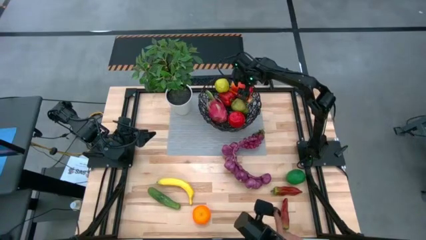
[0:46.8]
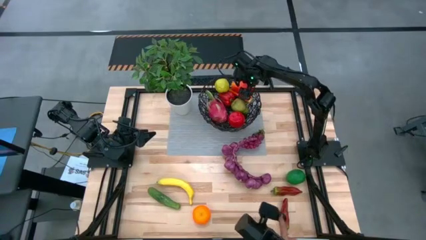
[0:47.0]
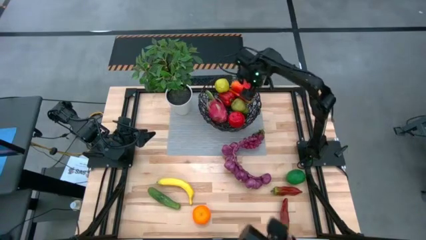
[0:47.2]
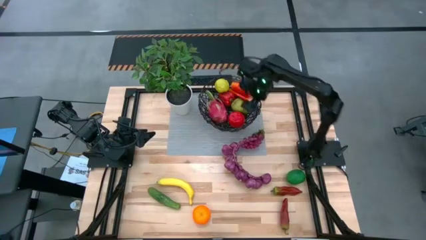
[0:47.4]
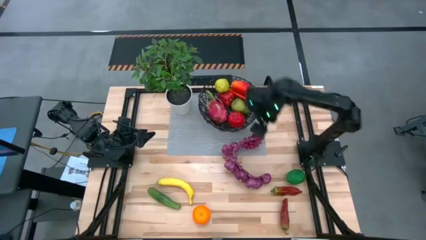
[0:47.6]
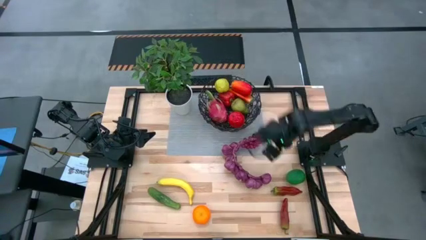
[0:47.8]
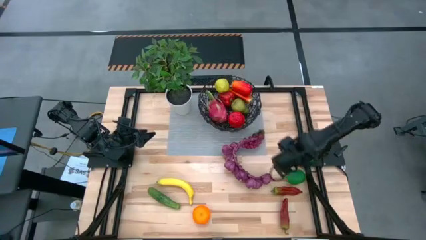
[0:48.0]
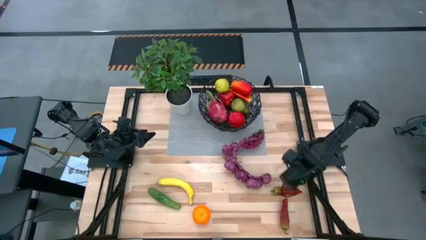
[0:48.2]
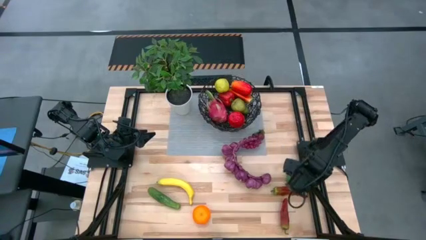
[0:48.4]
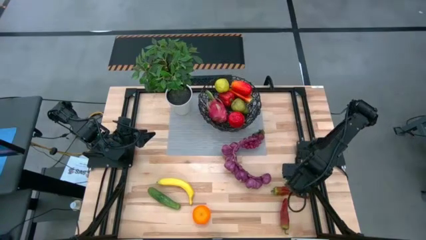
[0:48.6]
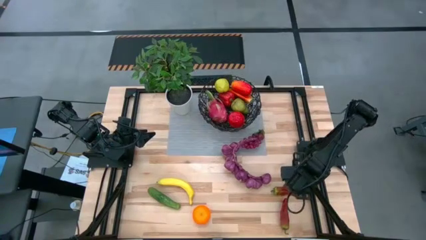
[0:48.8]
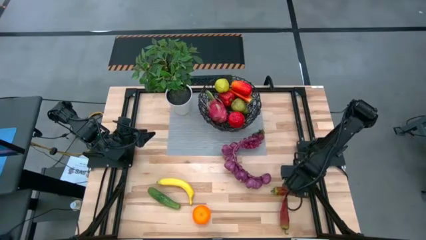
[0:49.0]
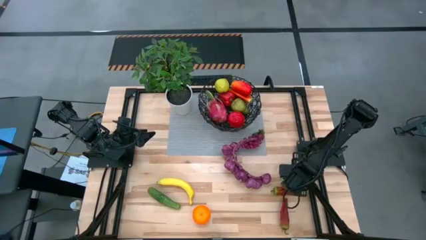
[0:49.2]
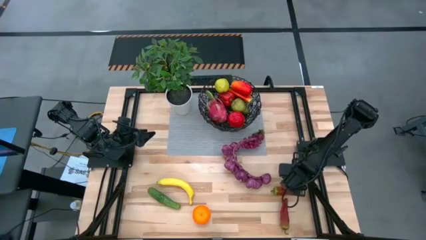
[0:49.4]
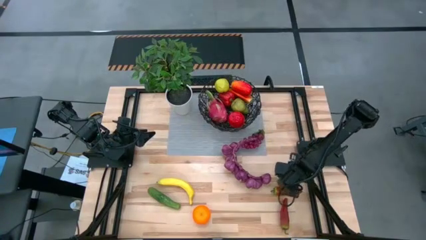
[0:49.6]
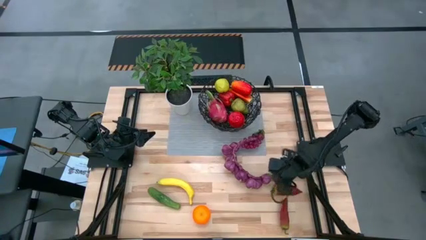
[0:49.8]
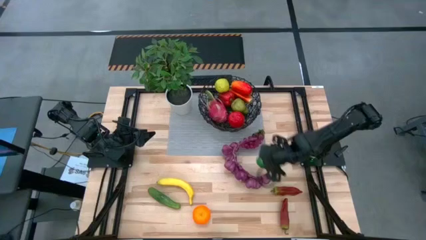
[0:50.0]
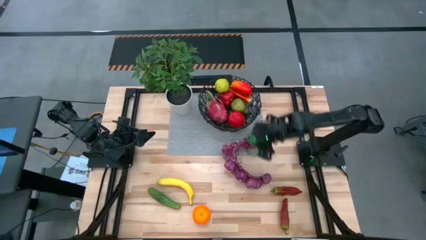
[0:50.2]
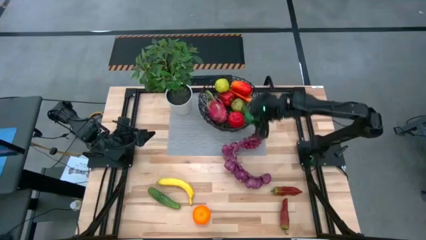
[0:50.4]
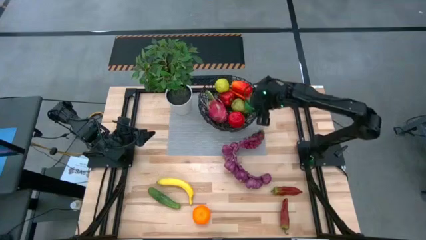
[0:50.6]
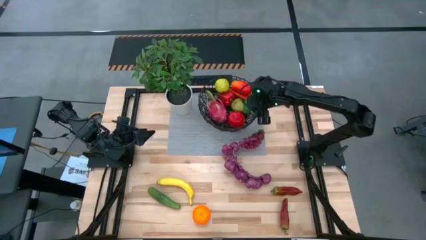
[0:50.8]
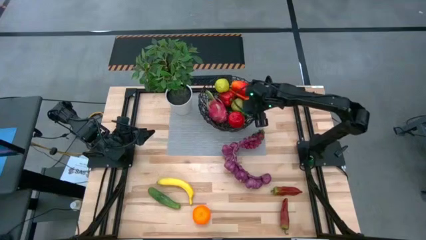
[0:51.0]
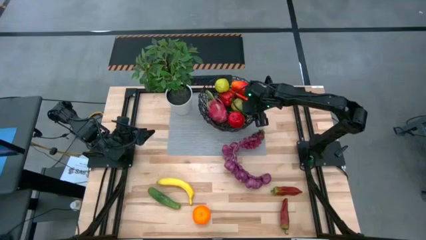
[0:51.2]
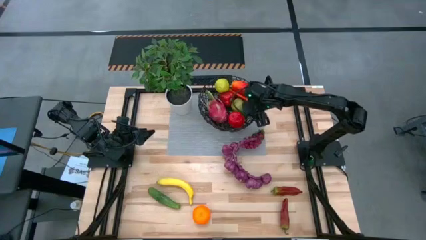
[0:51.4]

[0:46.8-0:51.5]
Task: Build produce basket
Put the green lime into the black wire basket

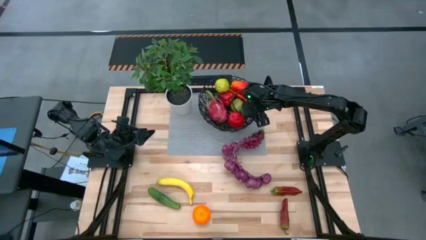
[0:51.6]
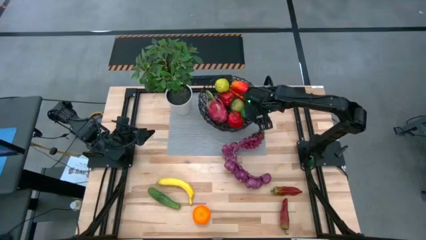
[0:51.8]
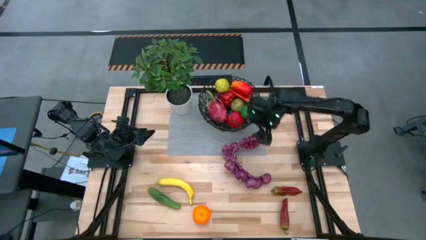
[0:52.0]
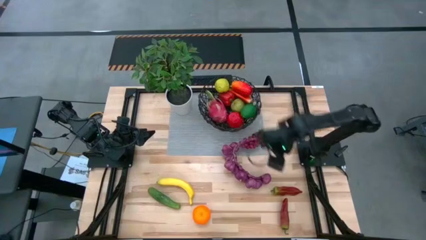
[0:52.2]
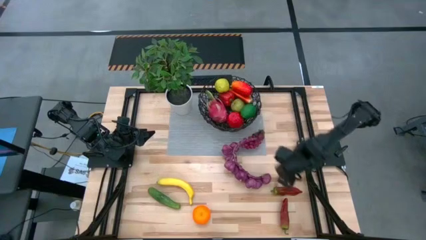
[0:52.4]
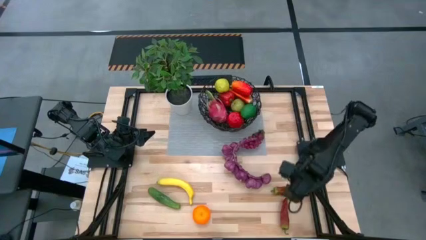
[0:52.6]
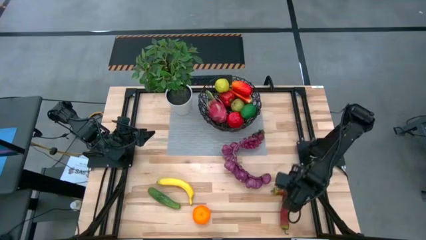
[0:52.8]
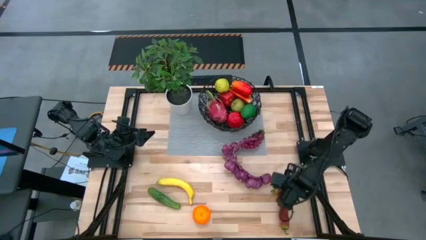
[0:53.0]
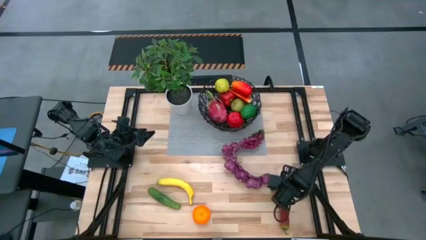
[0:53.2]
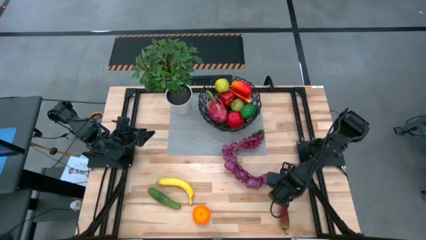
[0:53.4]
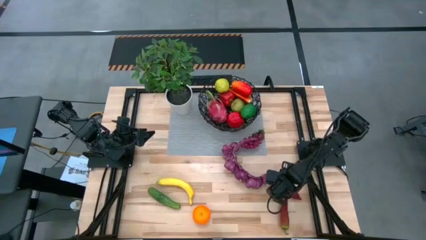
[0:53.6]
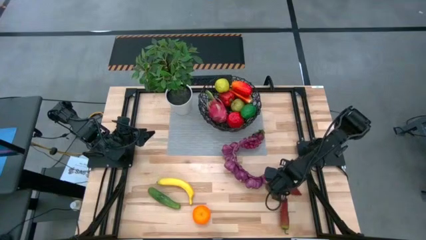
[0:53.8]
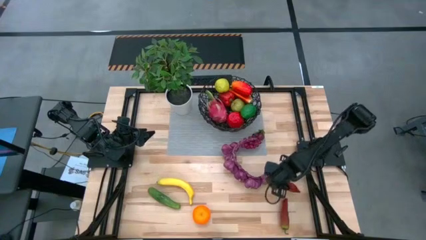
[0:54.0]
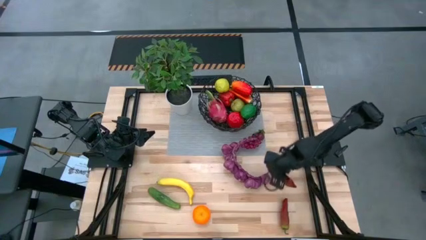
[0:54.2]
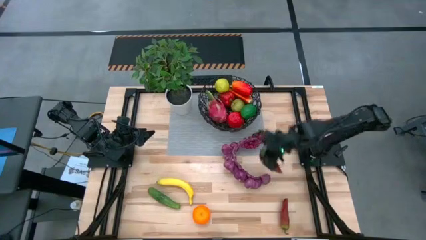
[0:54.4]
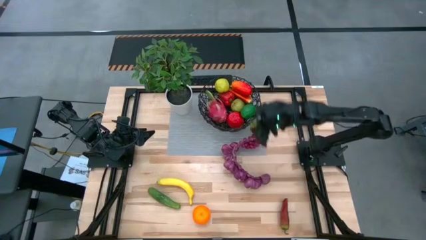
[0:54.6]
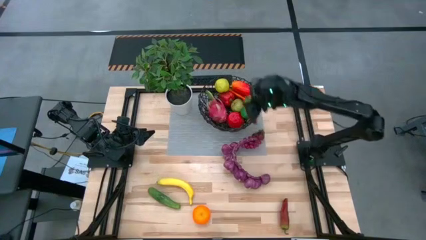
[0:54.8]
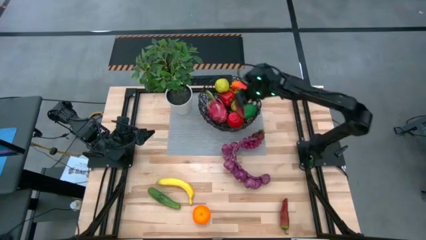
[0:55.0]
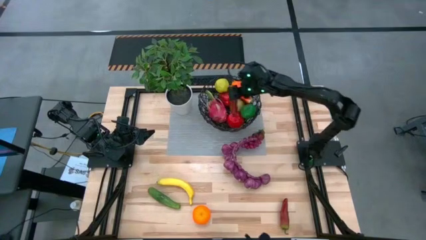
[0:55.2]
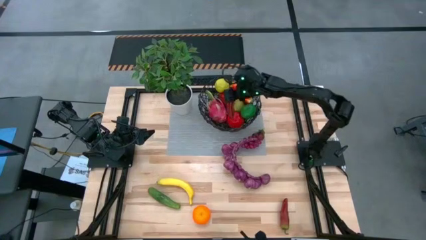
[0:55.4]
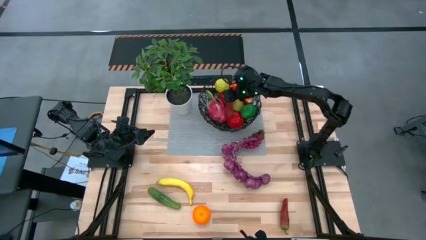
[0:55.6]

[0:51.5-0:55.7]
Put the top red chili pepper into the black wire basket

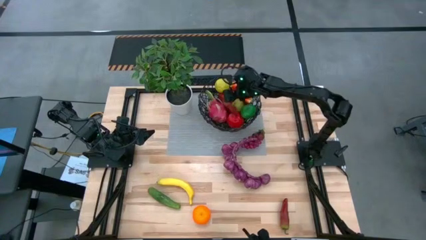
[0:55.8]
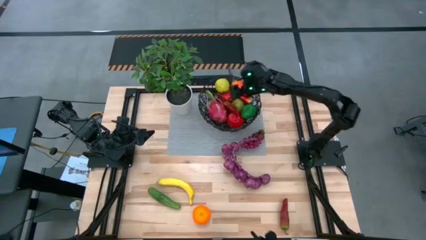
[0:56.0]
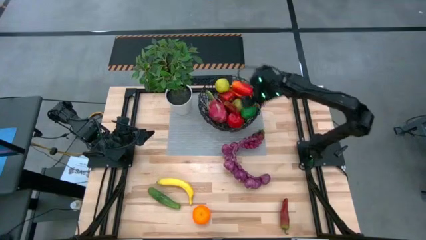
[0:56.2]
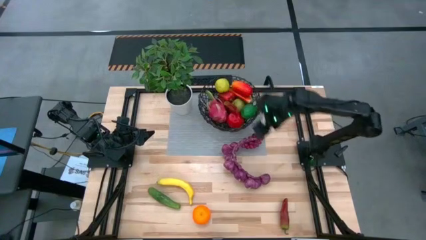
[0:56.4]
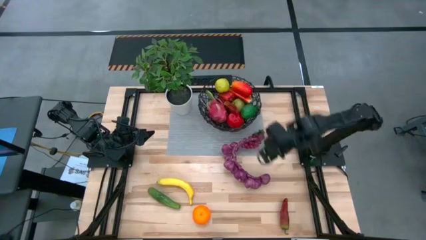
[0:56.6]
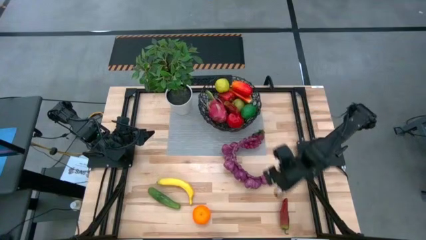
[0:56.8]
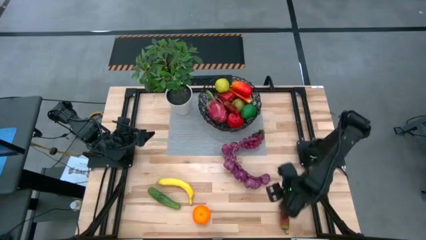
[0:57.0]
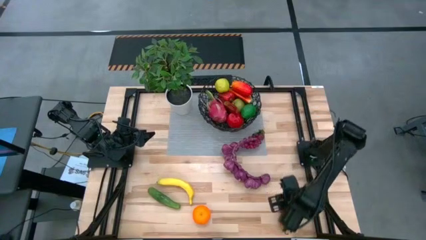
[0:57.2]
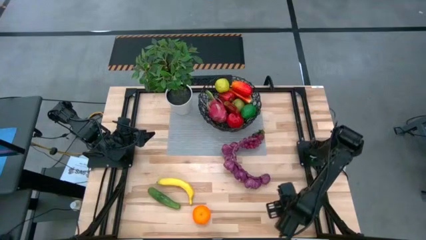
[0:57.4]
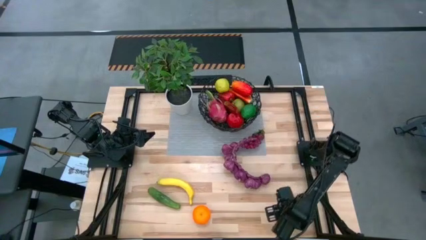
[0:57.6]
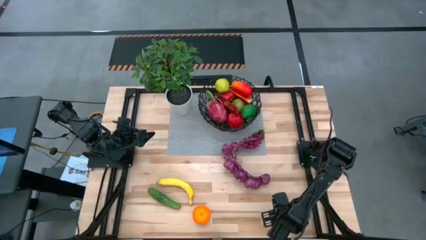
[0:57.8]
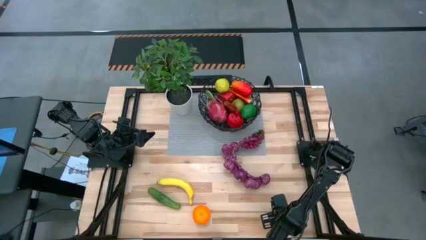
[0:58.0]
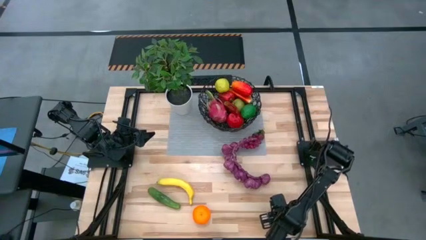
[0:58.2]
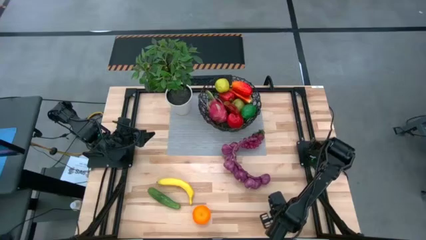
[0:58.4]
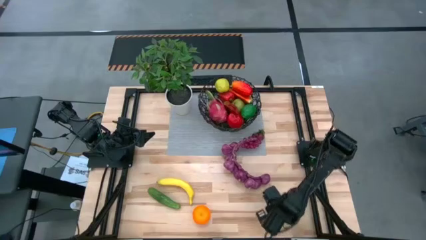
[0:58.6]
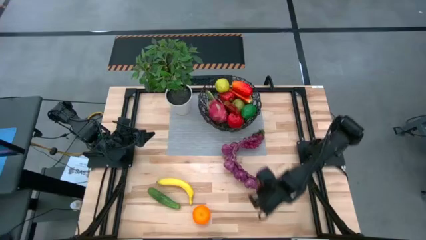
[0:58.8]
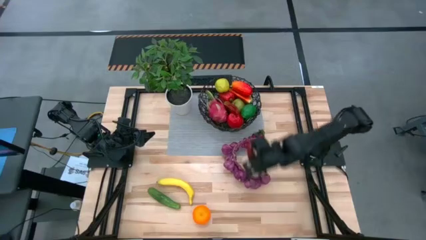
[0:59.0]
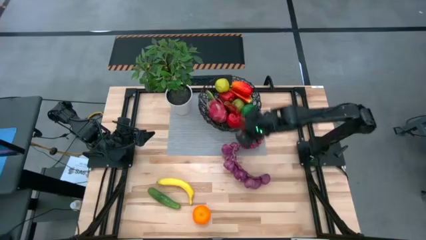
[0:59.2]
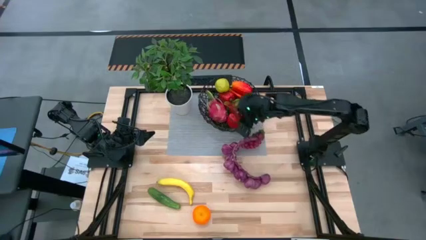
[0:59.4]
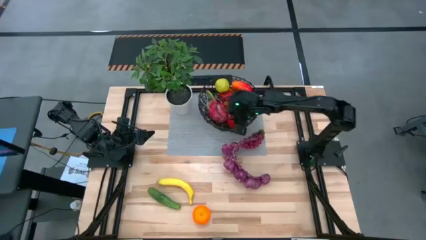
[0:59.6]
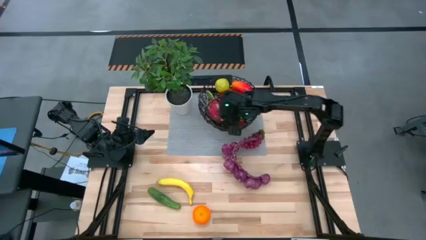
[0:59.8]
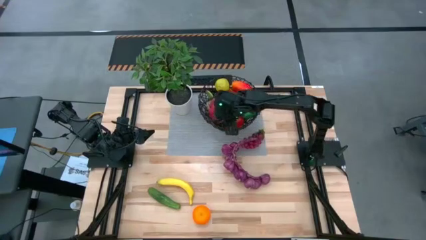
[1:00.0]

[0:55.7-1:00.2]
Put the red chili pepper into the black wire basket

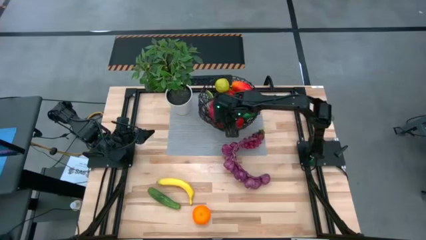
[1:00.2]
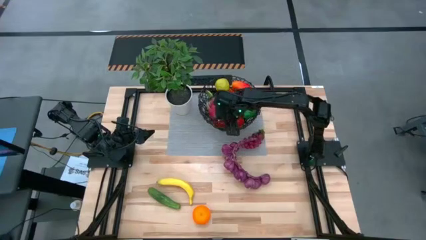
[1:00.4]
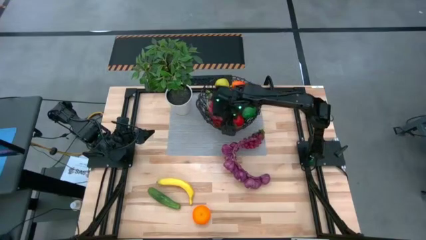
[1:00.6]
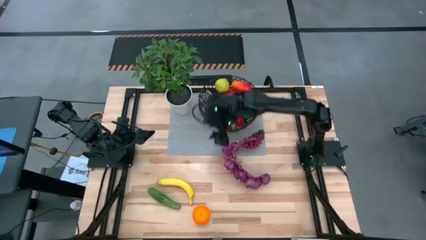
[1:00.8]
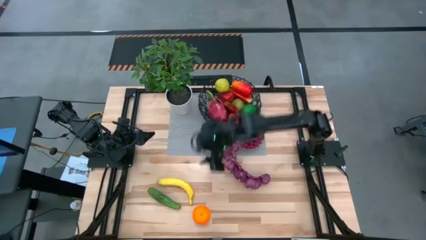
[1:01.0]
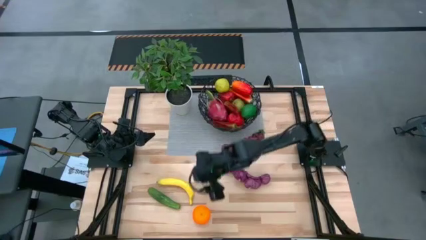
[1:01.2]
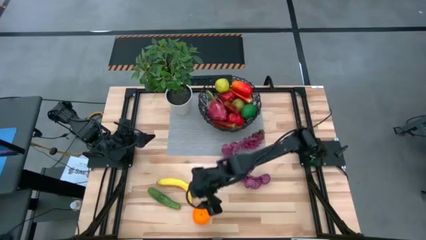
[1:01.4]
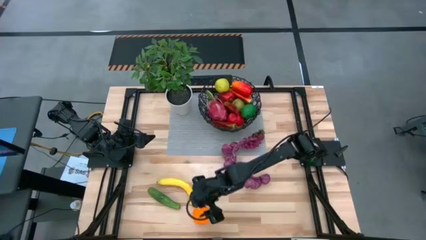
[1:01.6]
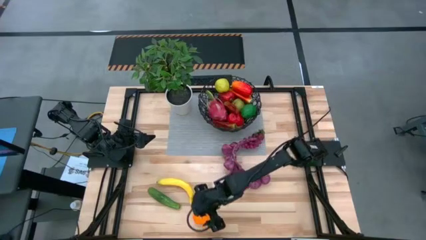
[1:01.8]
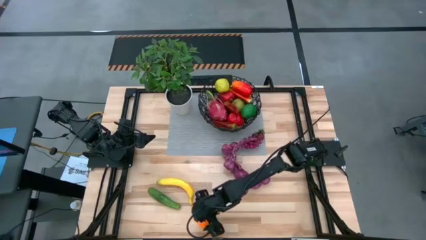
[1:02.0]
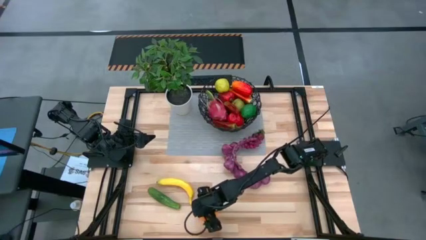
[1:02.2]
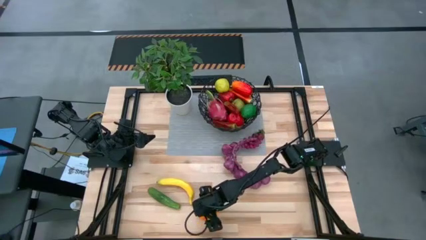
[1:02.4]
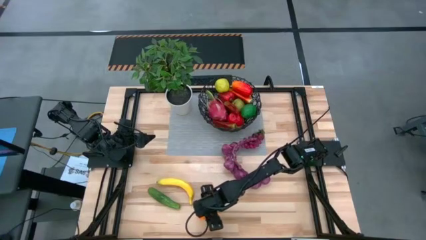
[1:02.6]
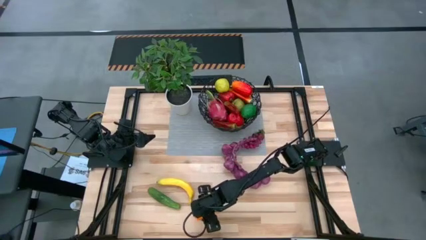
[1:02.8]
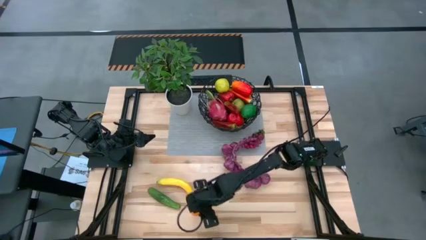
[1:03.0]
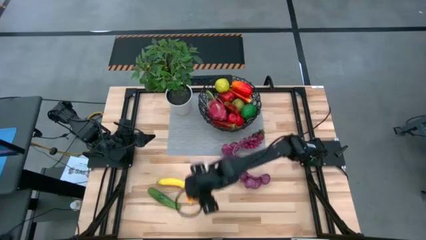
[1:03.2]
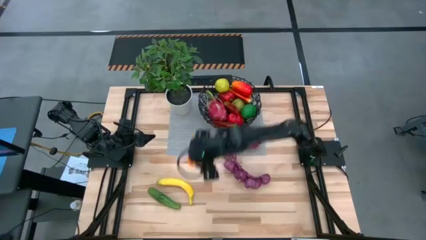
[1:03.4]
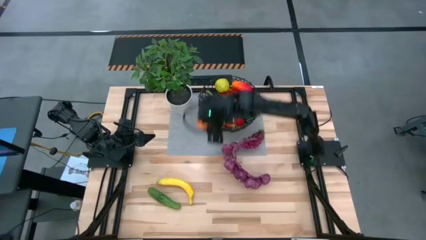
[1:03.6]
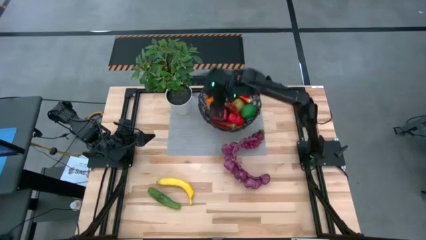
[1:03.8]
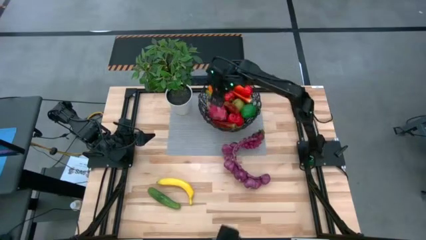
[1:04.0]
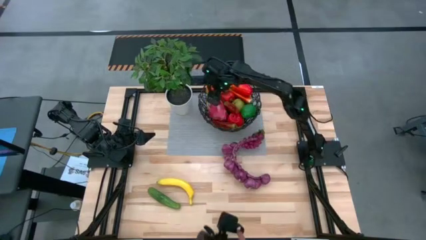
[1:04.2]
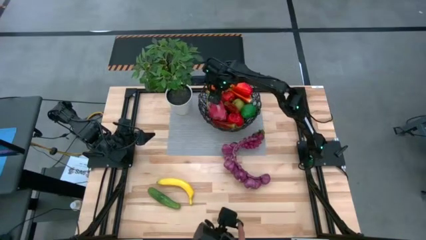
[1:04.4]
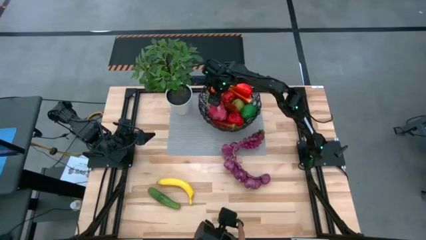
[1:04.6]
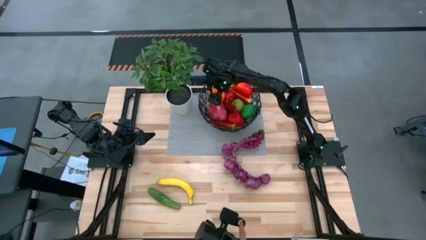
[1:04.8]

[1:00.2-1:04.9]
Put the orange into the black wire basket
